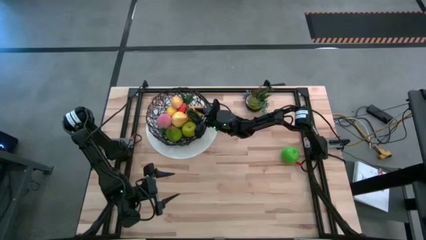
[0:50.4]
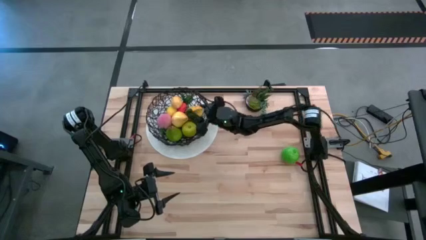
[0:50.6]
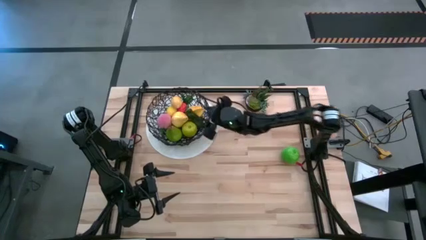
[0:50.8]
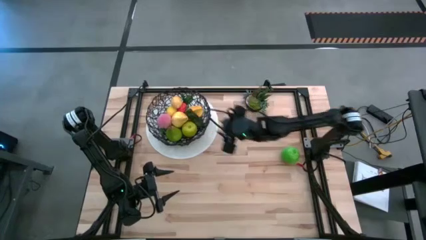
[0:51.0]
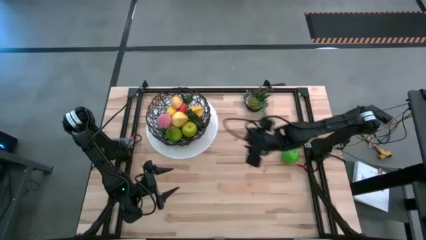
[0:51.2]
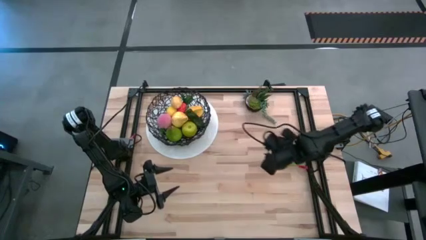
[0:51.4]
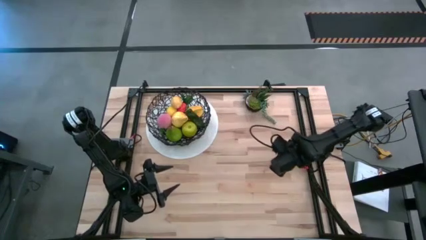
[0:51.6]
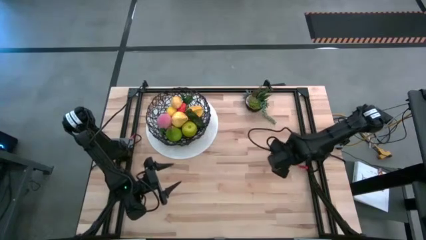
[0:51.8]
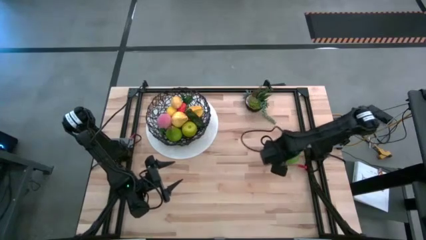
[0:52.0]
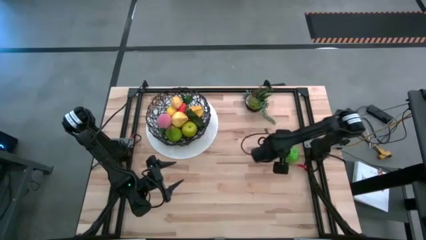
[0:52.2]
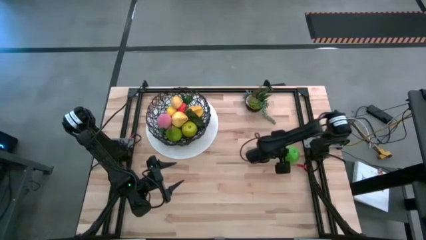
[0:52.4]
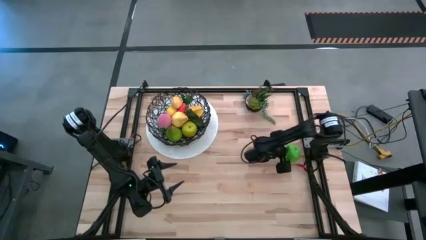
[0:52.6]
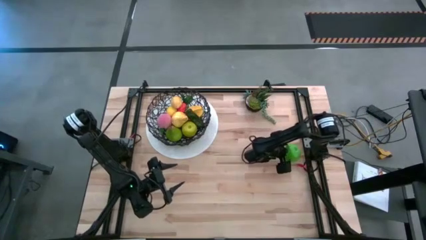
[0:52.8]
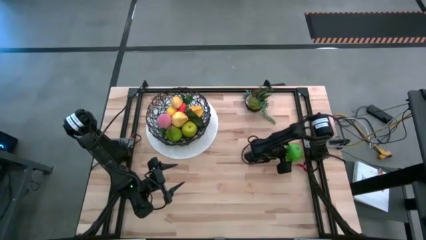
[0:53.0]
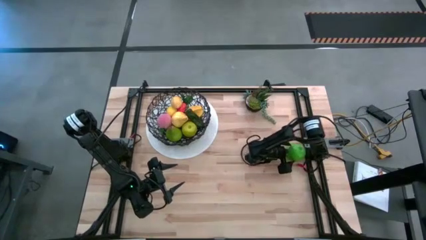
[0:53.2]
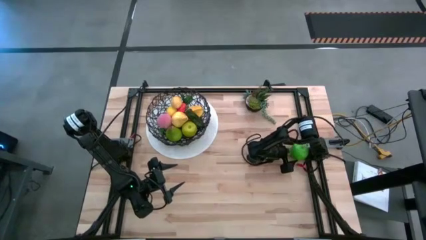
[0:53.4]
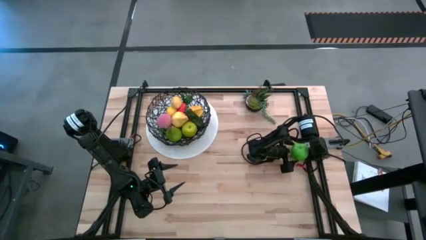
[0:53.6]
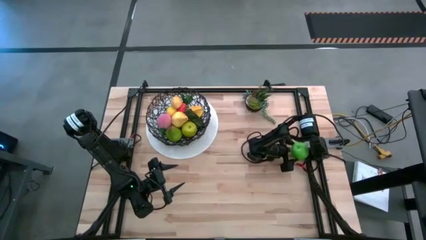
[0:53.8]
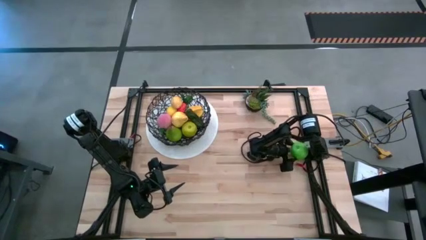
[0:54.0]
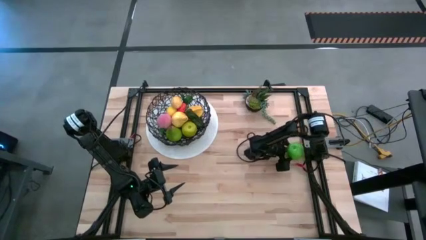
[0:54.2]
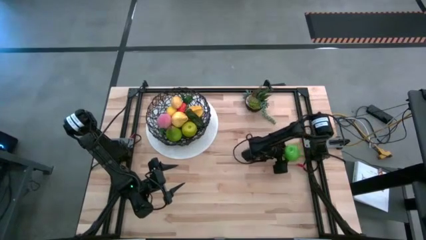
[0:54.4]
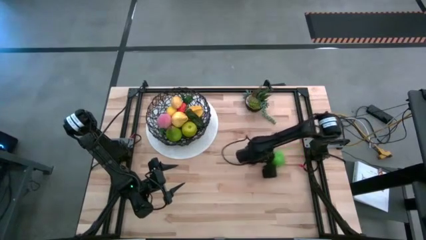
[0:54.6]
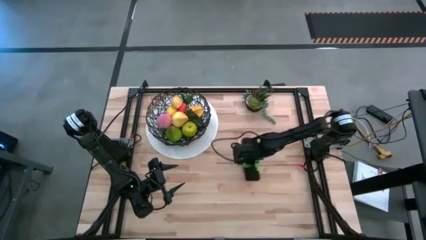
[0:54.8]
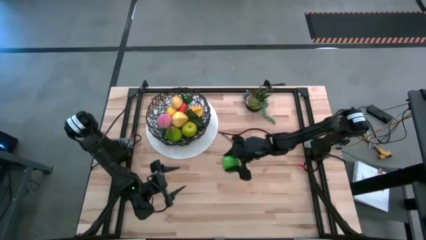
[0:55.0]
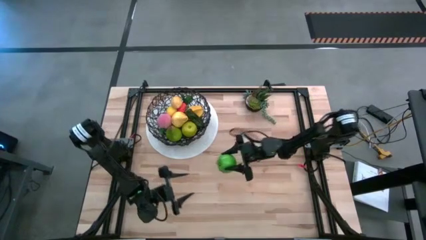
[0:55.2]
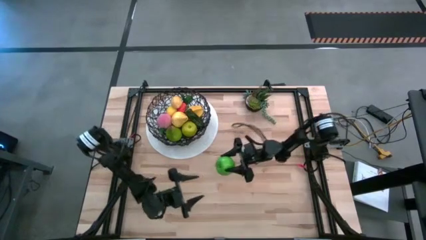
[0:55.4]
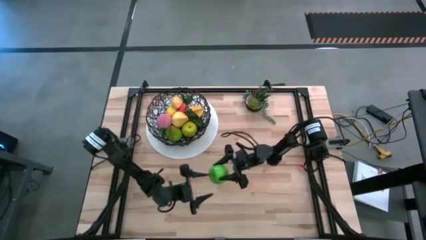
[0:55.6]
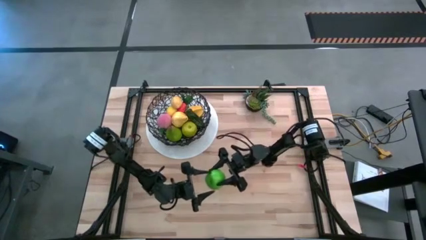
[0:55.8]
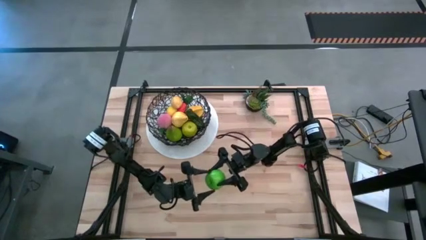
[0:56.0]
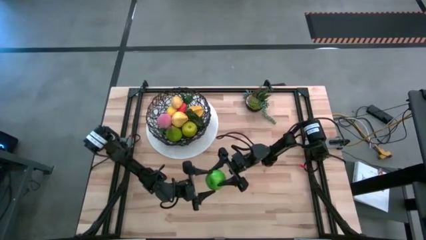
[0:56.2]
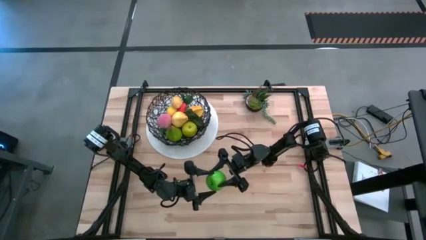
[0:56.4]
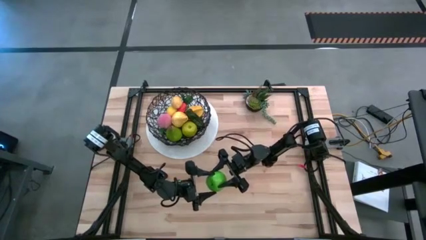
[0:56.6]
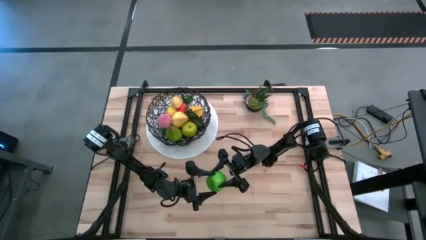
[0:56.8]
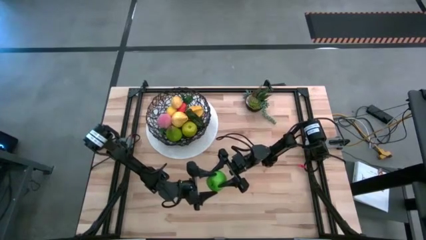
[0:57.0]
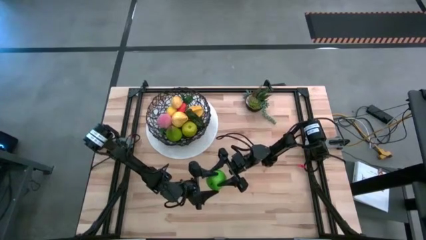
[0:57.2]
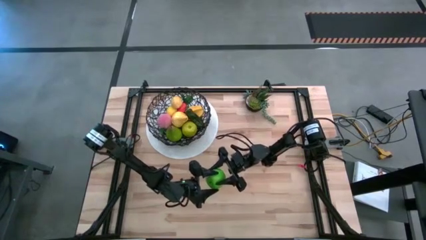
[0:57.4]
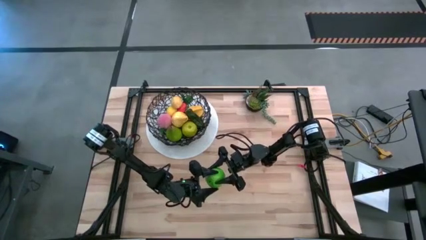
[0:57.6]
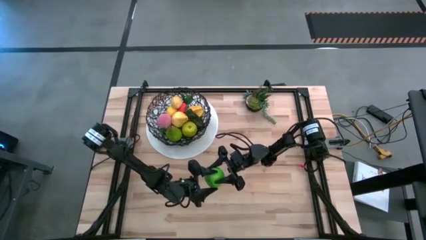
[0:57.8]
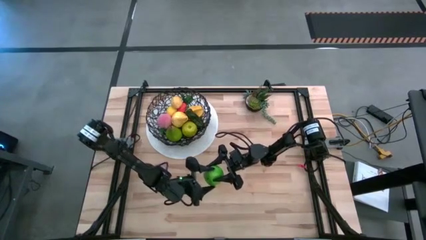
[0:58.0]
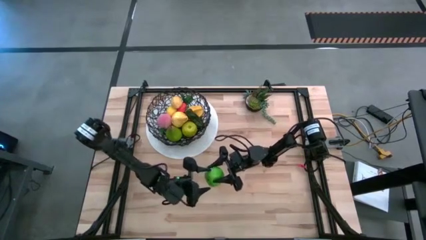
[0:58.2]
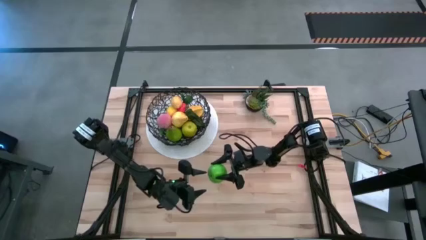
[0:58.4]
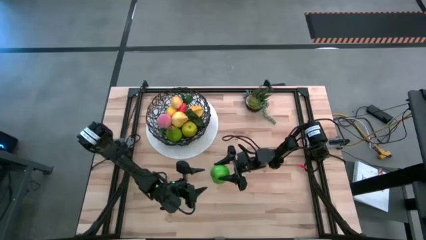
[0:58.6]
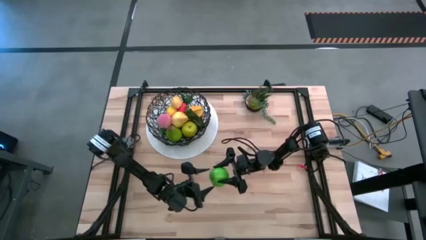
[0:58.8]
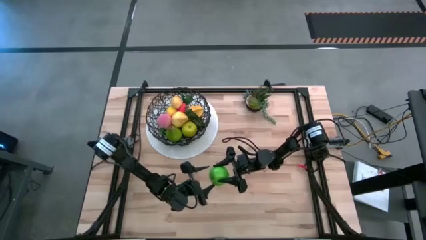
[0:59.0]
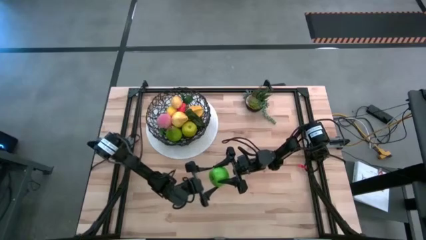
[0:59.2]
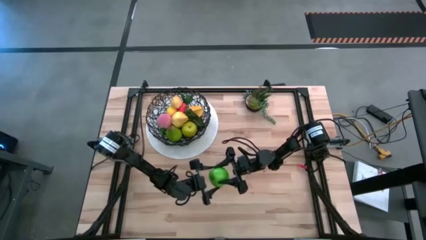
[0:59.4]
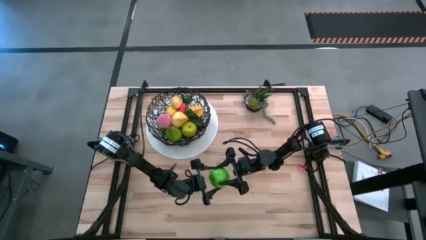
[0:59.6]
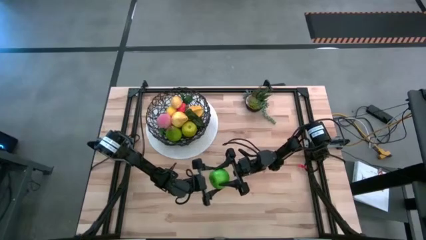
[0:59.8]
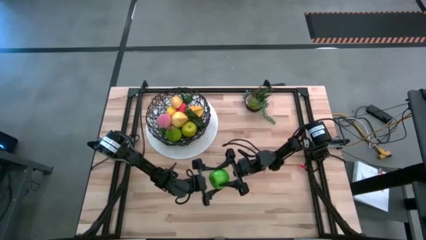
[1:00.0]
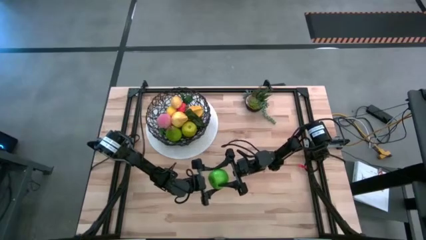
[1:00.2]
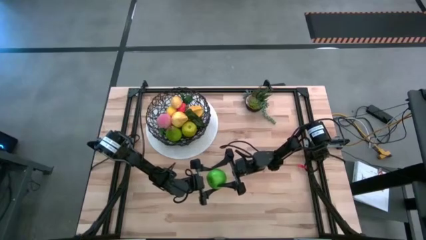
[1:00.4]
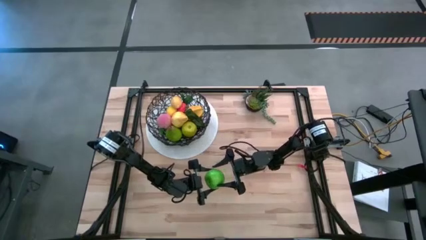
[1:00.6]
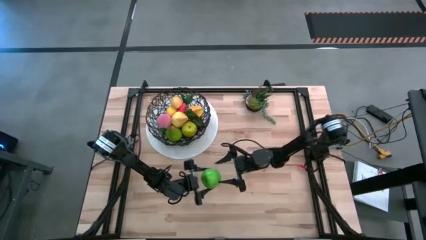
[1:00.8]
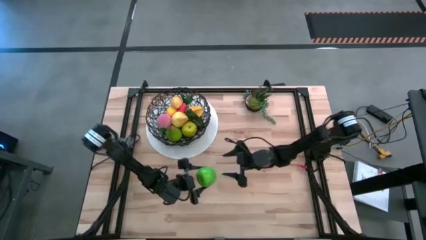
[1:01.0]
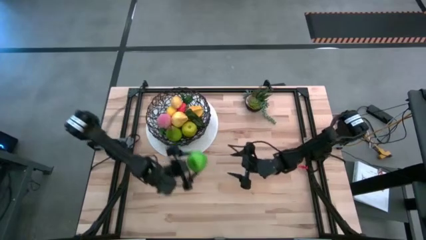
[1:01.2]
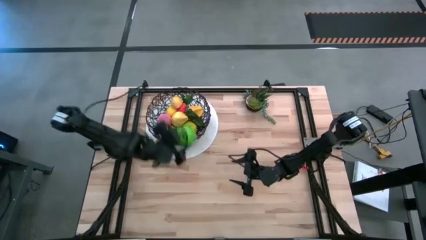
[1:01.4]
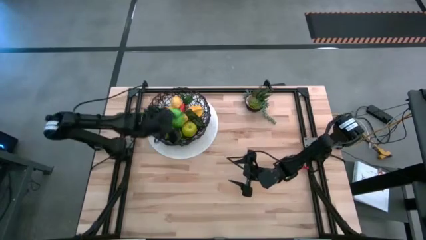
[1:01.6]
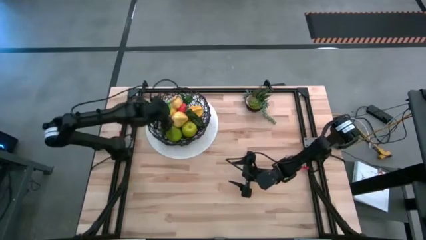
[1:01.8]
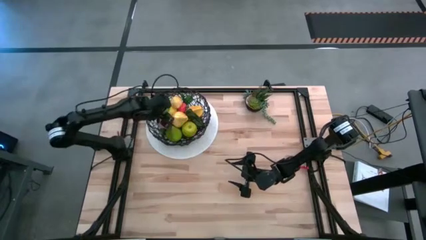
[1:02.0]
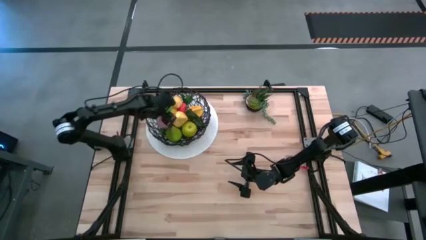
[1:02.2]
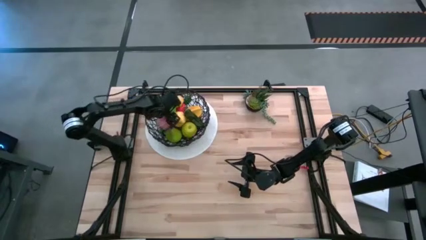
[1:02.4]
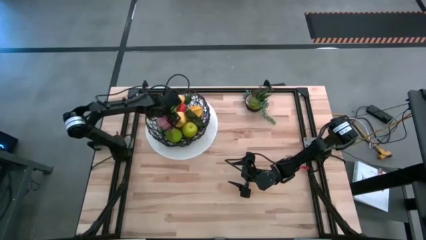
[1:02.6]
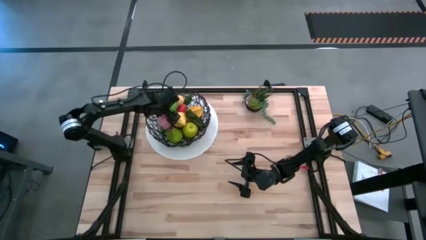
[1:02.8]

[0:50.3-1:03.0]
Task: Build produce basket
Put the green apple into the wire basket
